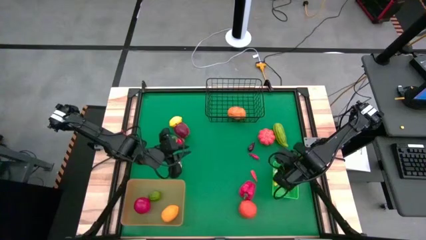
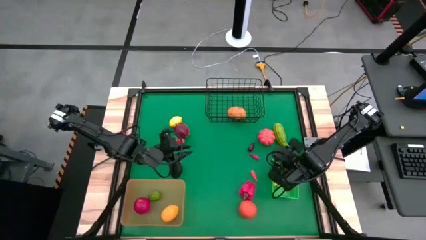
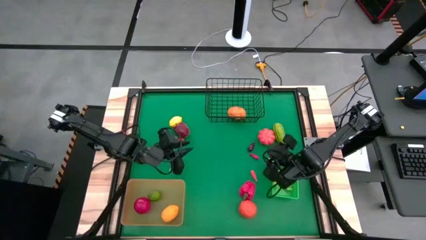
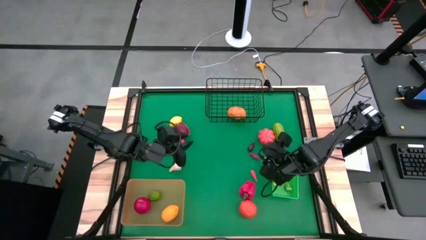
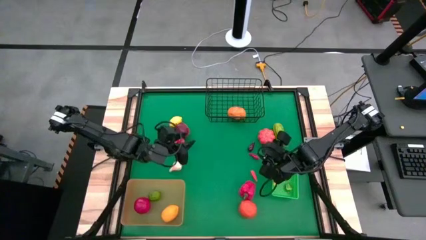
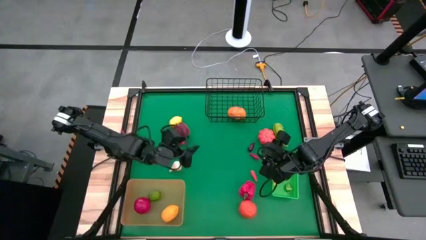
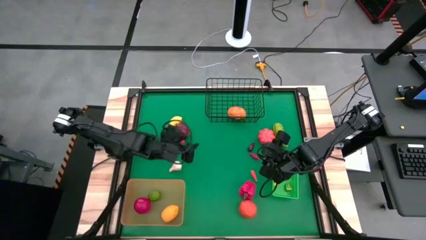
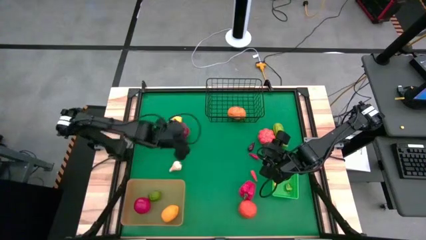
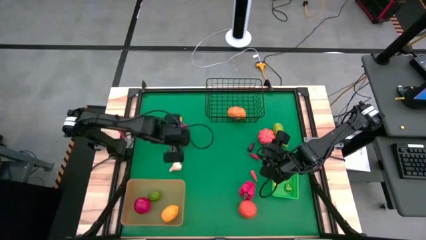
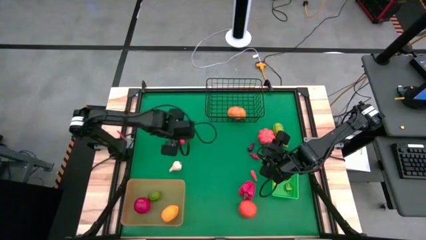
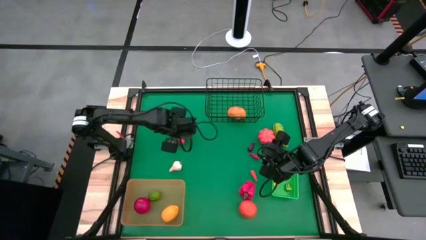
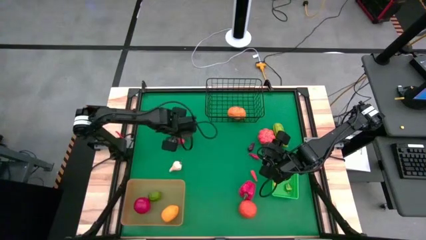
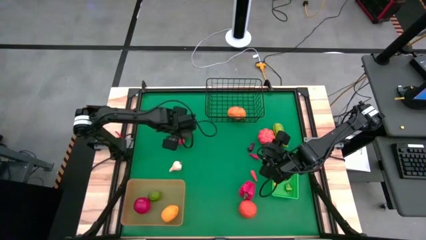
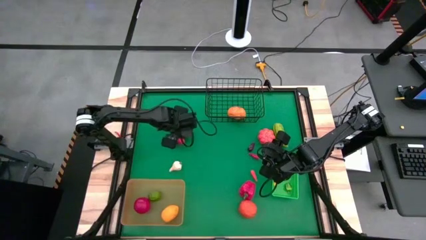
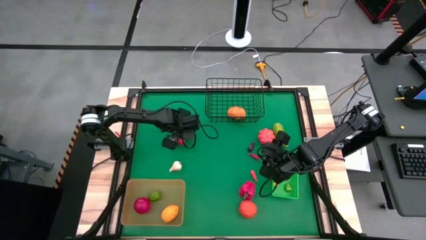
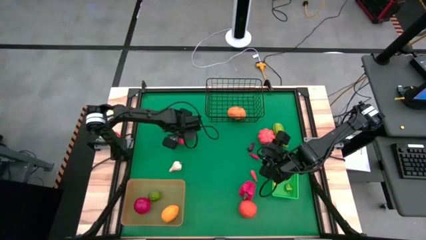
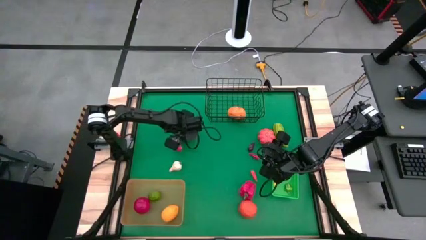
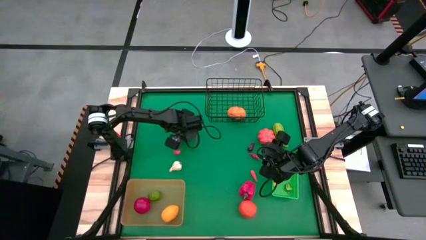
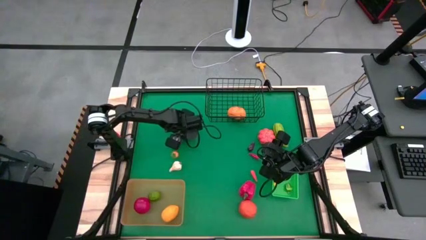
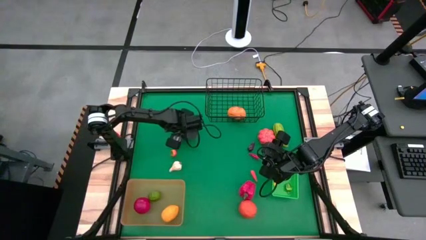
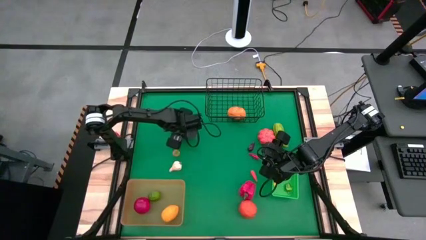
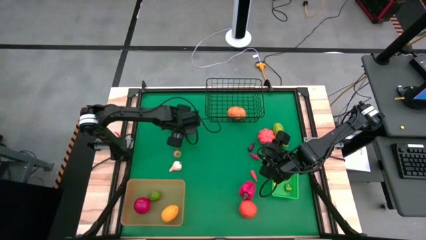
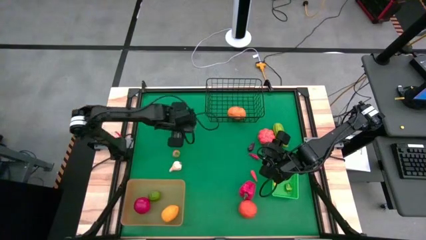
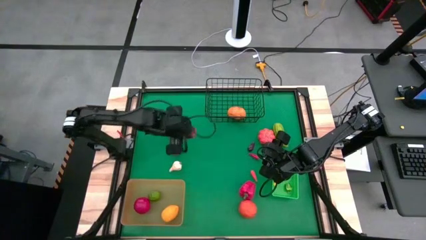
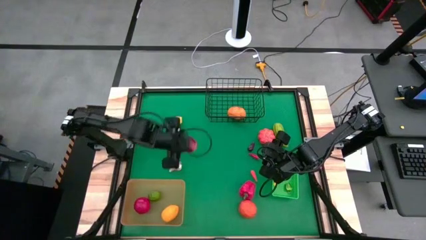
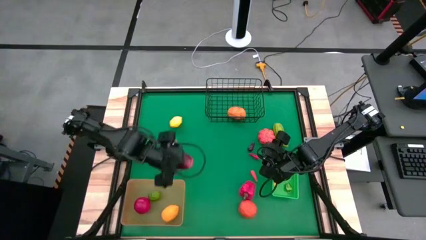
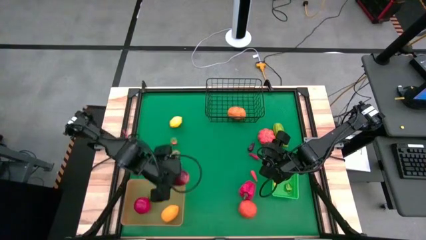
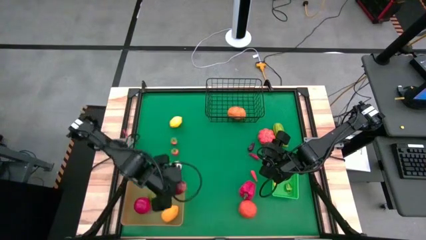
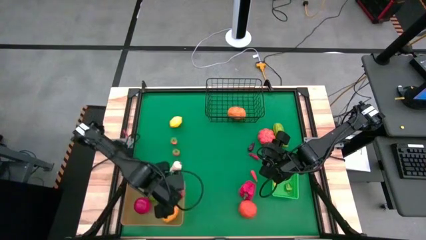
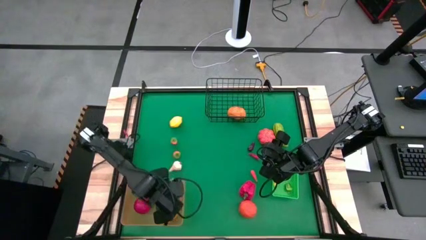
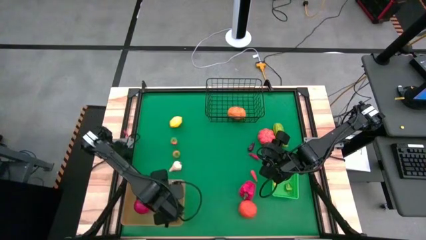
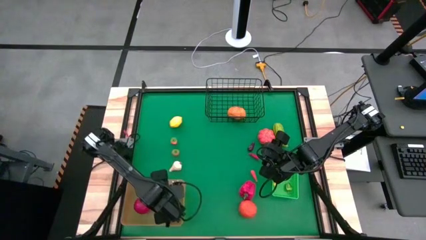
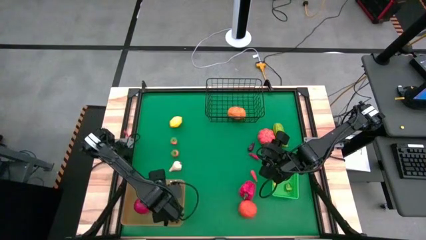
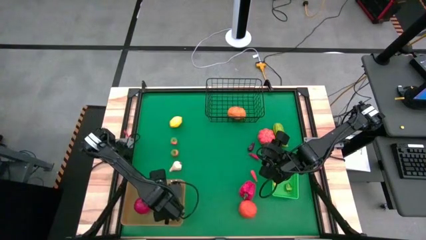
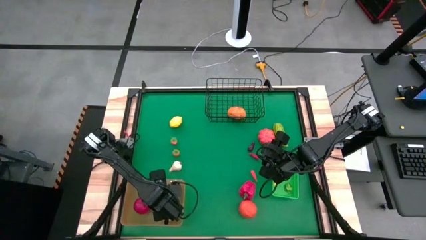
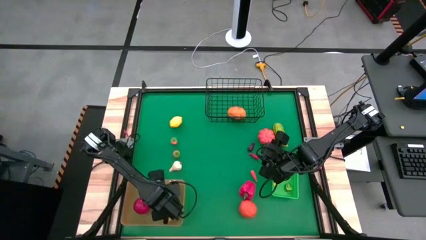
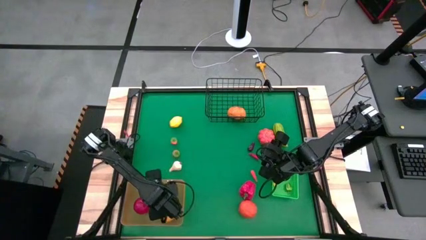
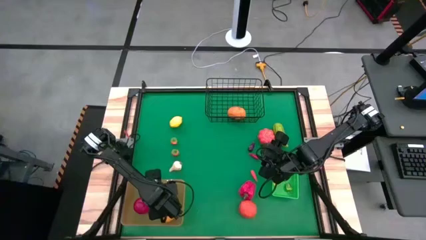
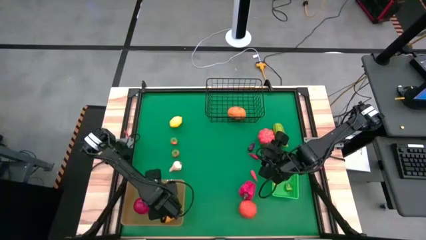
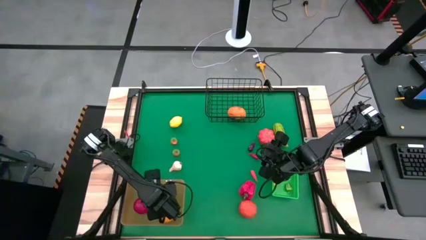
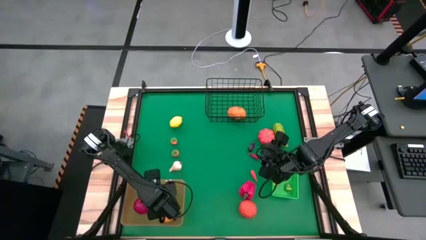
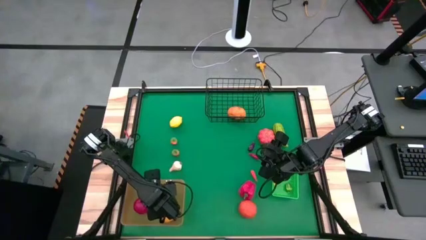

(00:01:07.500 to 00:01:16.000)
Task: Sort produce into baskets
Put the apple into the orange bin

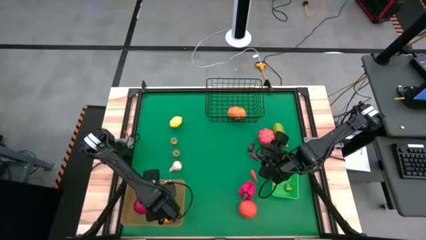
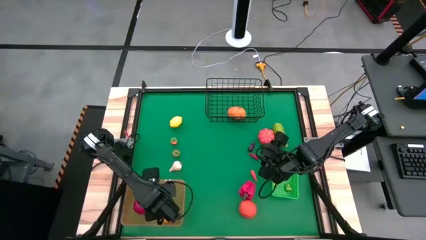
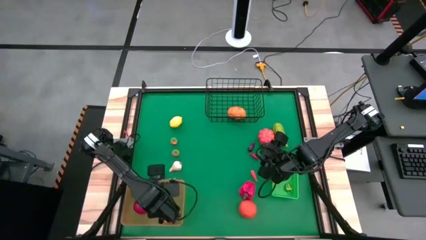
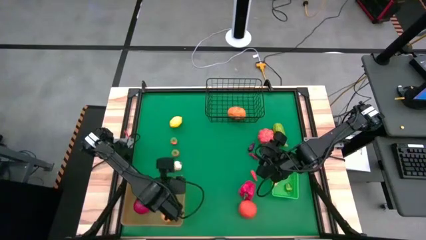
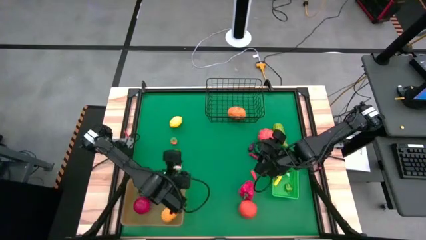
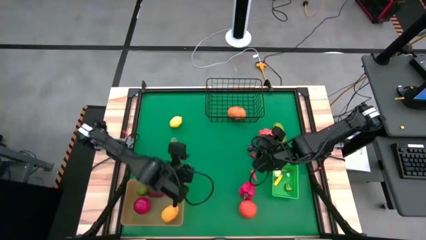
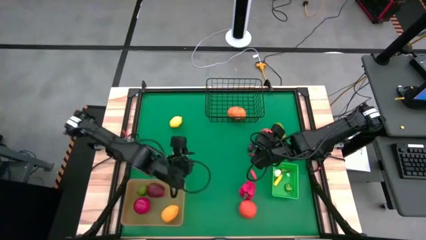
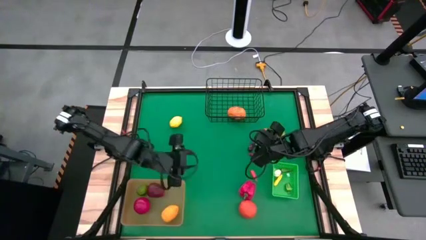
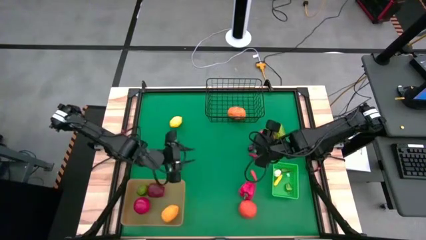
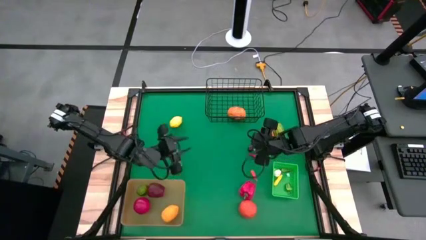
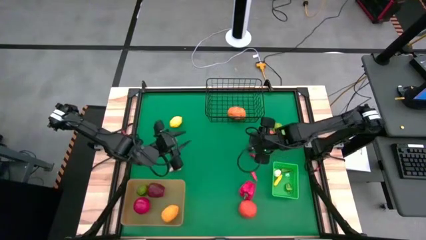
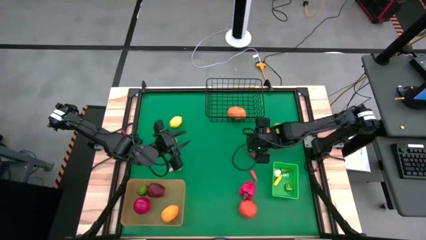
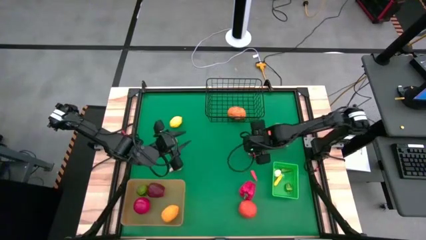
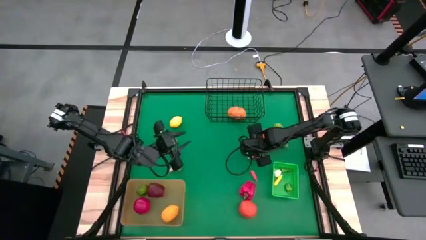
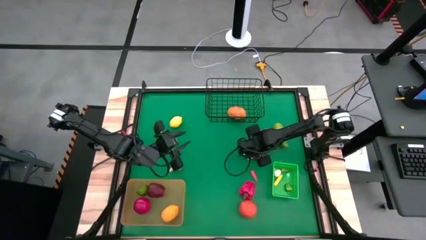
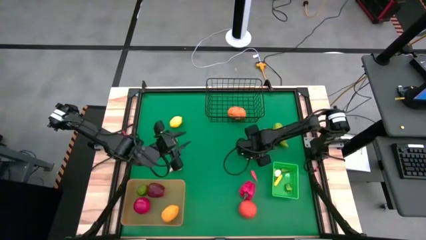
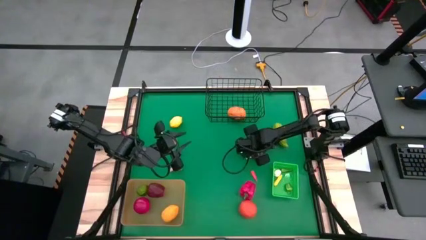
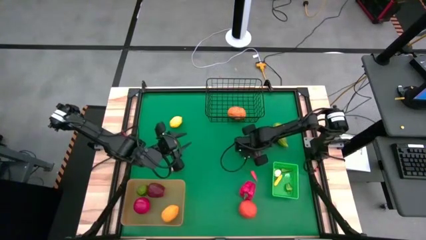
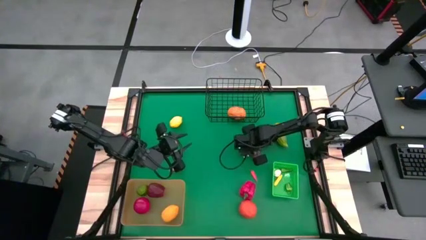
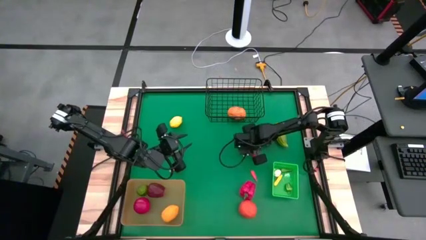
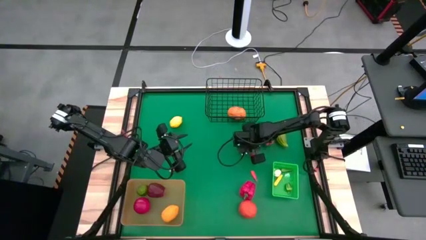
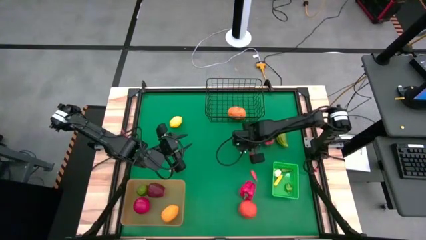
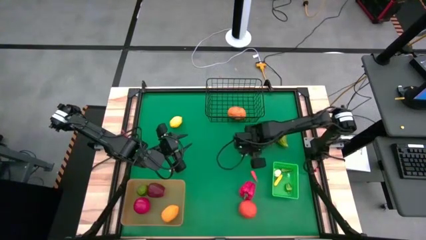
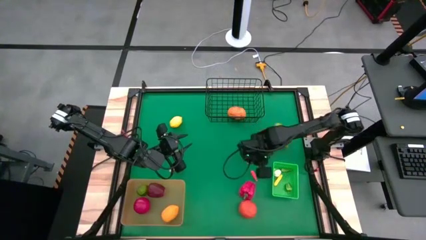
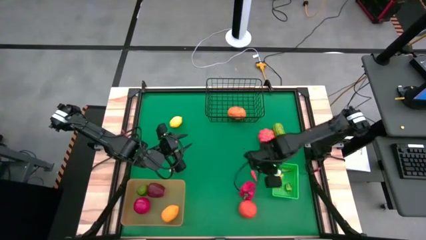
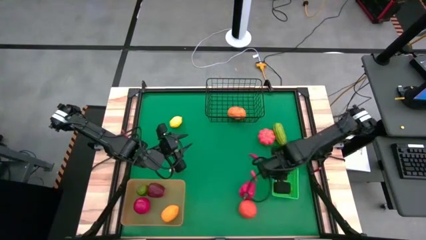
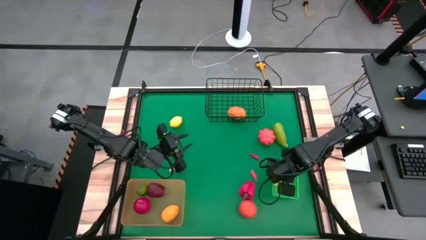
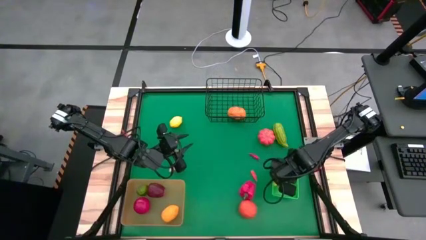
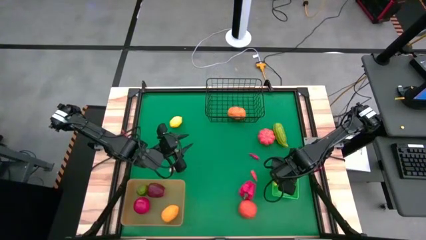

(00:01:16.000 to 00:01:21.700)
Put the eggplant into the green basket

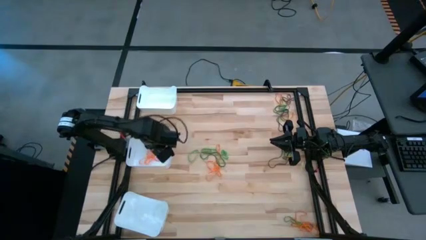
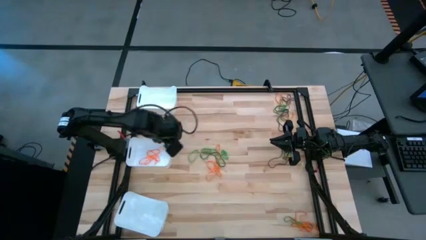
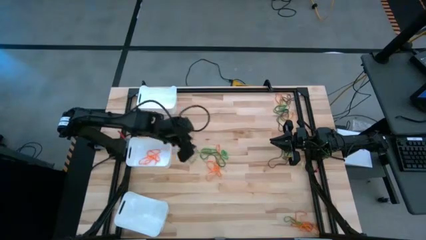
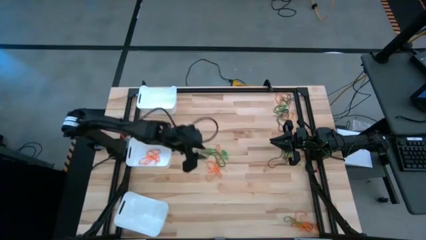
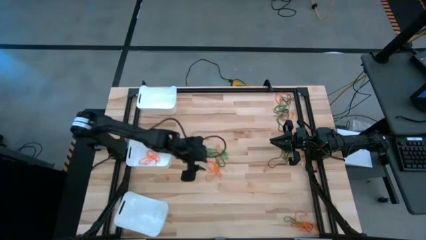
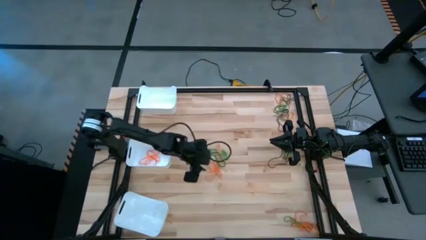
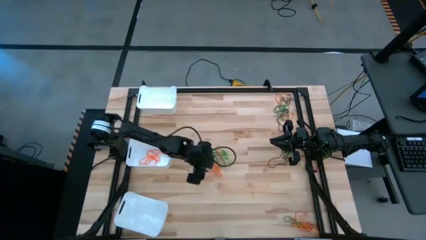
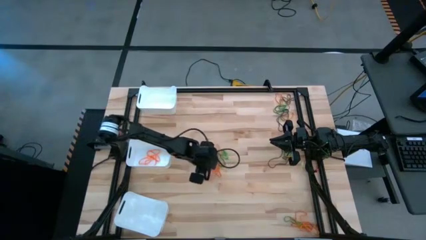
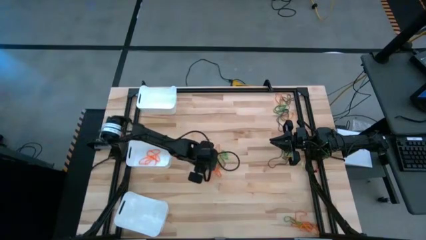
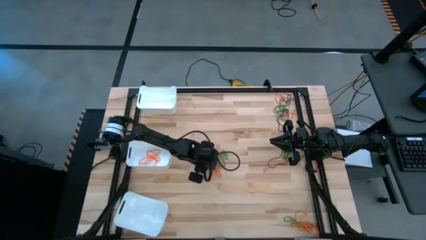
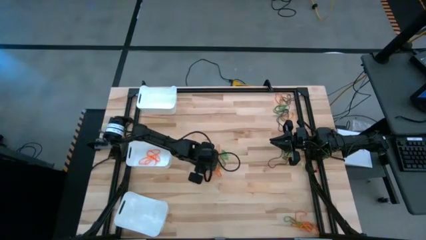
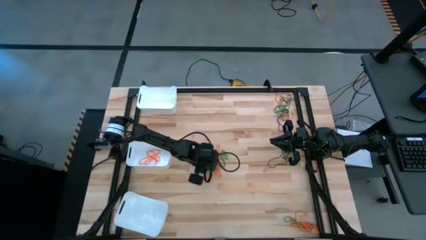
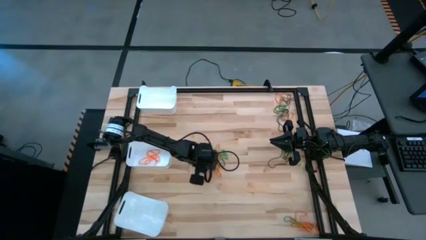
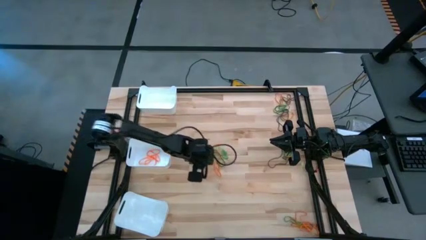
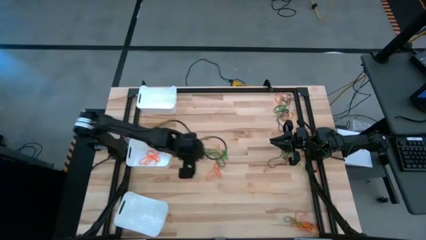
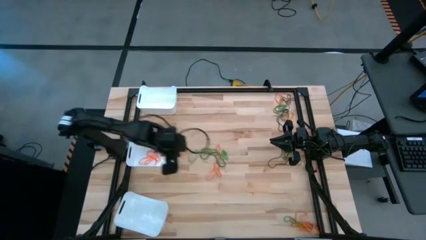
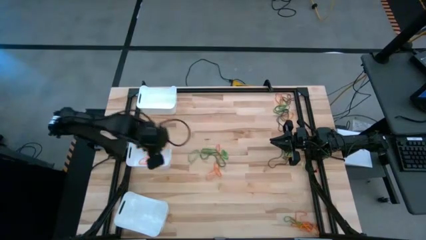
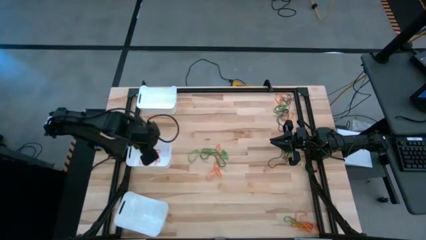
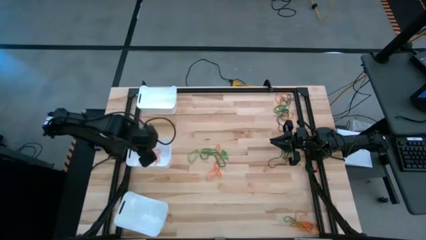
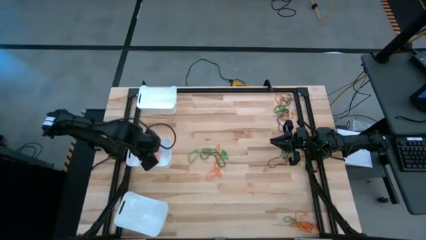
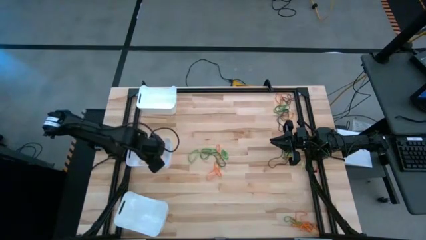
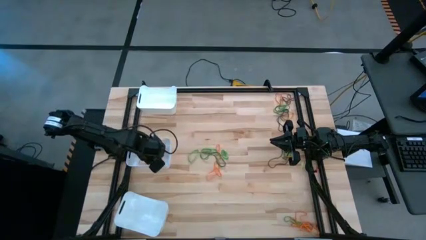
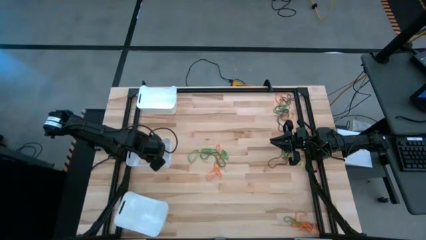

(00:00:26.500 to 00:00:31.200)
Task: Sort rubber bands into baskets
Put the orange rubber band into the middle white bin
